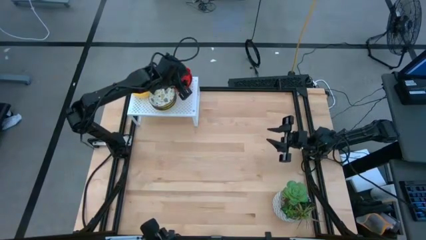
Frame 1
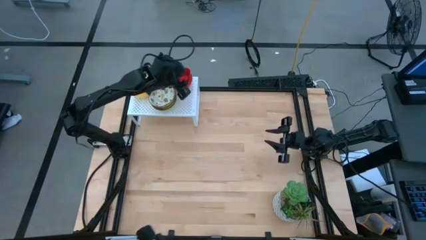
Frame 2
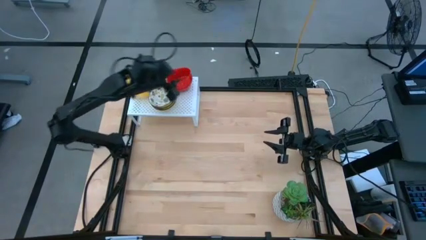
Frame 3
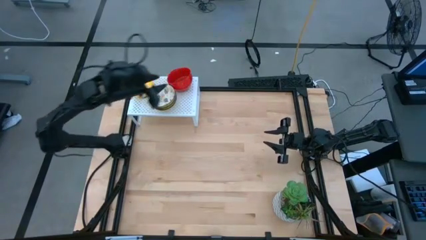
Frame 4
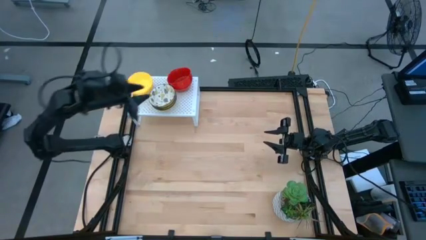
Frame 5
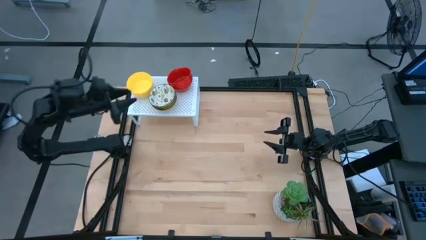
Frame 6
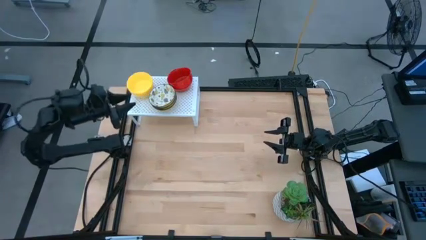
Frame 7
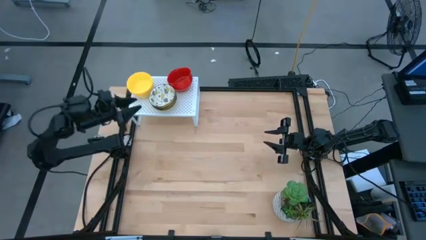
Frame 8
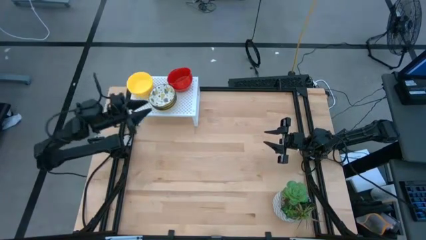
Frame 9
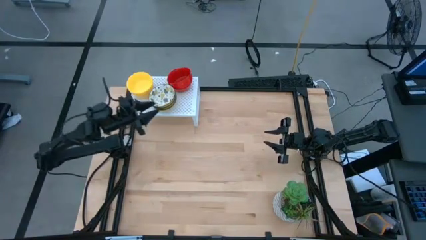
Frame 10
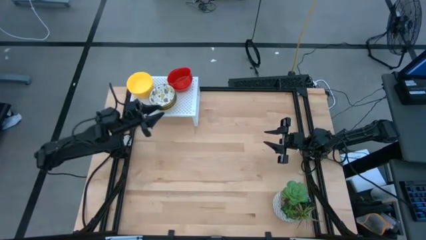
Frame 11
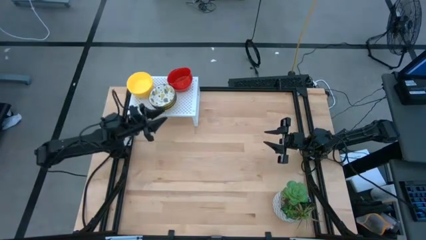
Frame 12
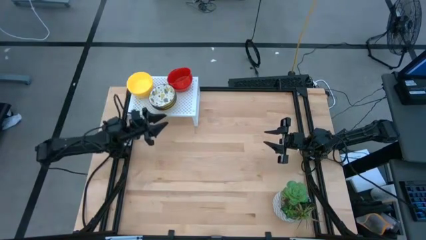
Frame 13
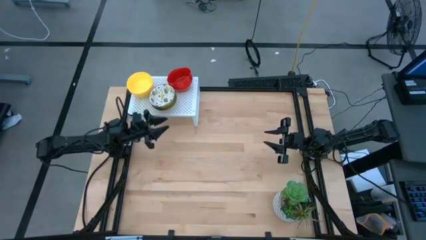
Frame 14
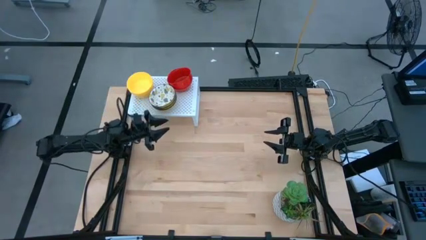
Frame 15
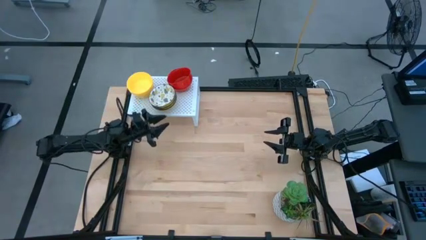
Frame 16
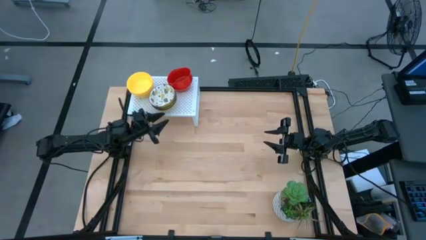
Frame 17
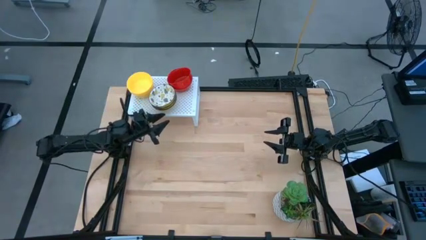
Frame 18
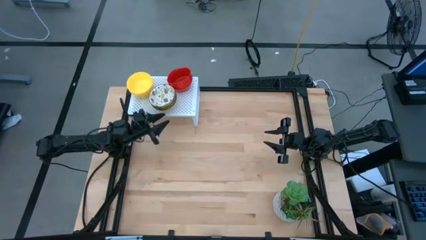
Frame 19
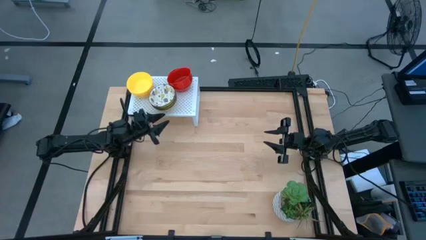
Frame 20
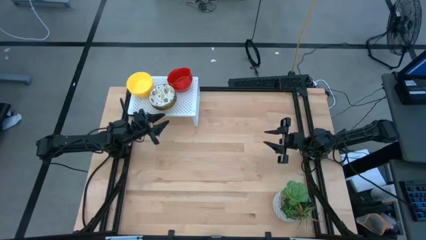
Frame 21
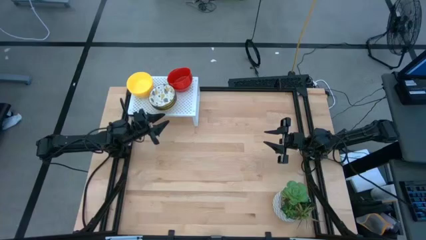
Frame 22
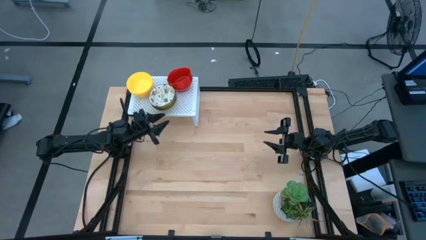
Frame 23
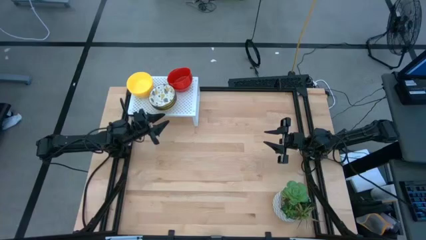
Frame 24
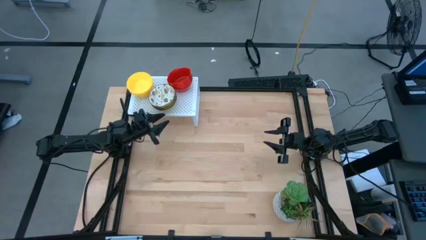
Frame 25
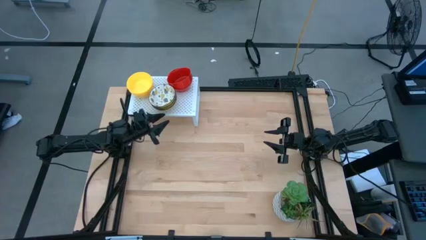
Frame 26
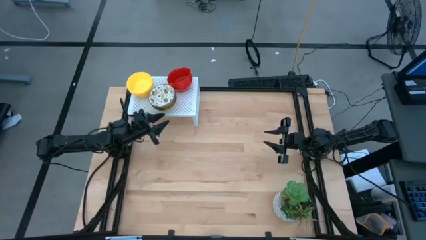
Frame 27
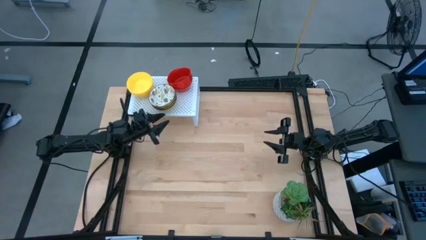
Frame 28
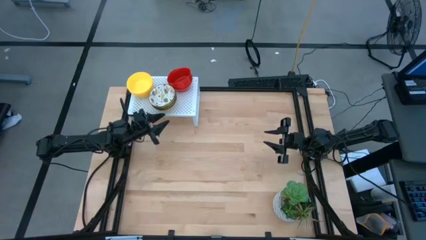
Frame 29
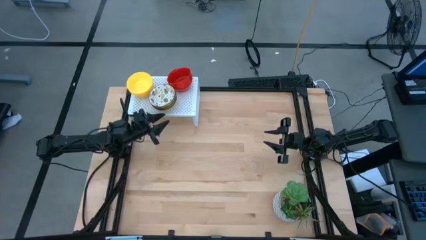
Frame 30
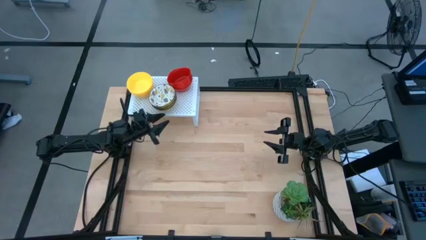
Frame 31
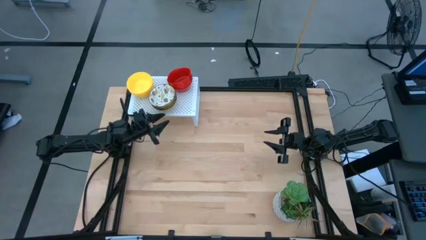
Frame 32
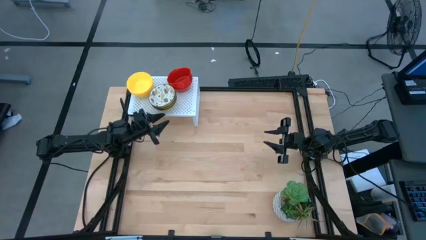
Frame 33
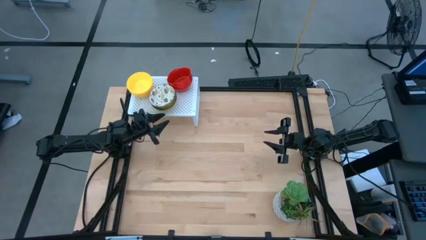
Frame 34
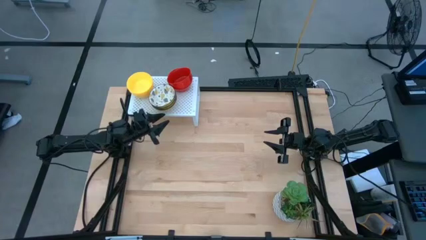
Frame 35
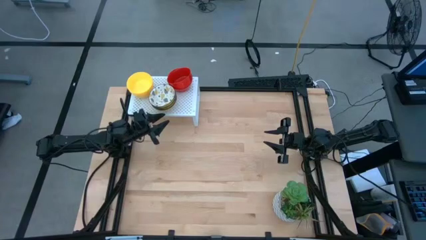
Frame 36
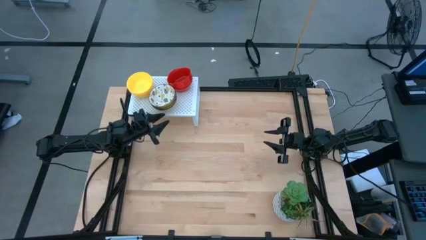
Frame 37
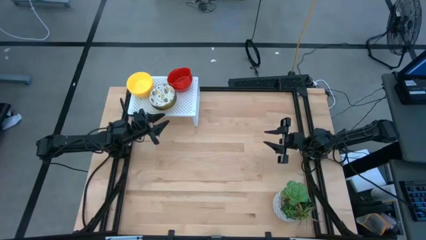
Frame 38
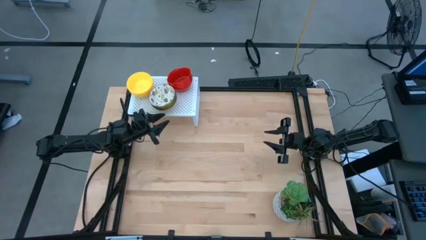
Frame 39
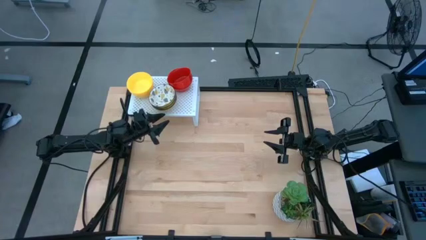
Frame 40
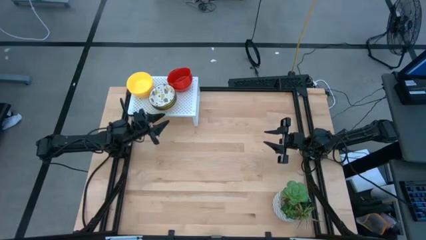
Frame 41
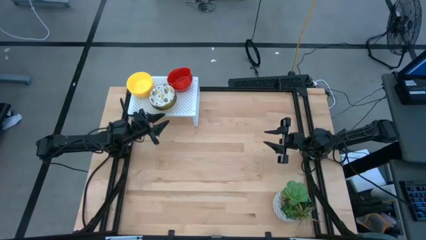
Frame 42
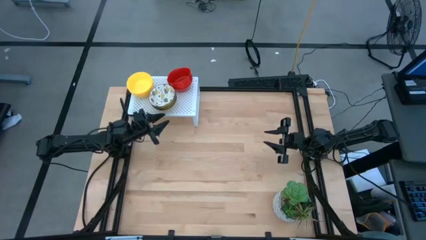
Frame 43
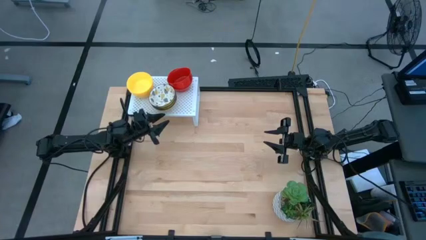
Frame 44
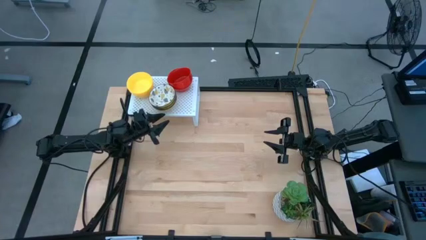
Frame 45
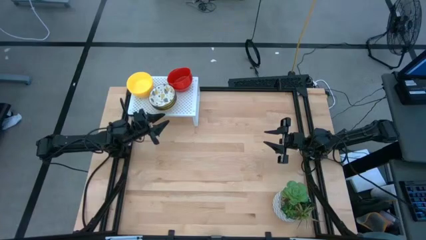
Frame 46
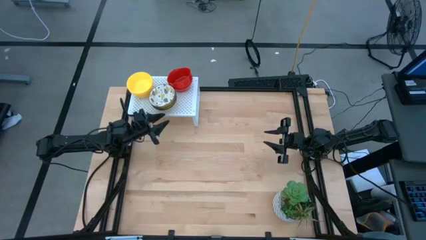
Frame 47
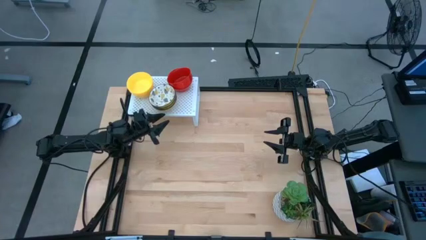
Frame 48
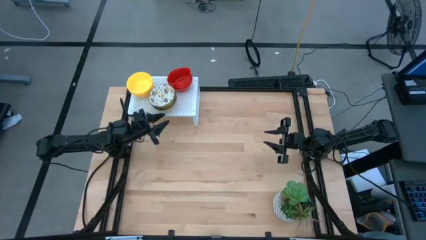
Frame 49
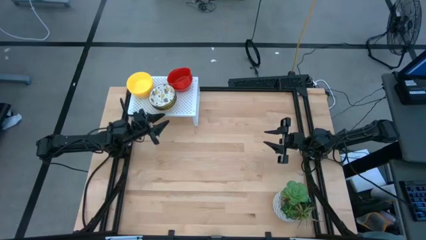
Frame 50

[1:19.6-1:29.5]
Task: Pick & Place Mini bowls
Return to Home Position

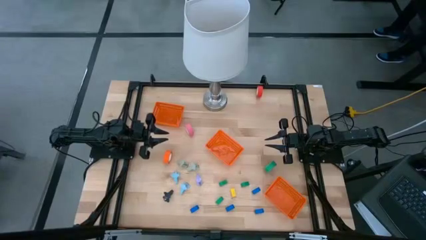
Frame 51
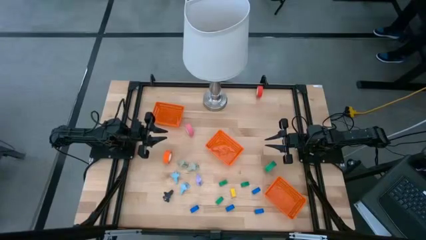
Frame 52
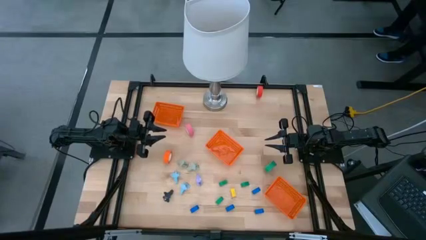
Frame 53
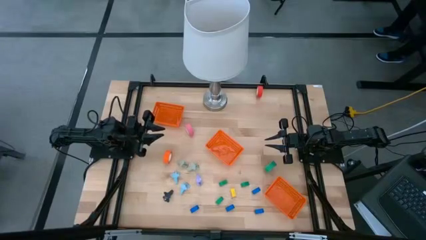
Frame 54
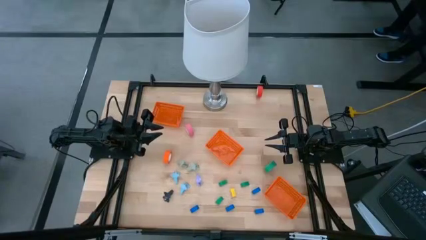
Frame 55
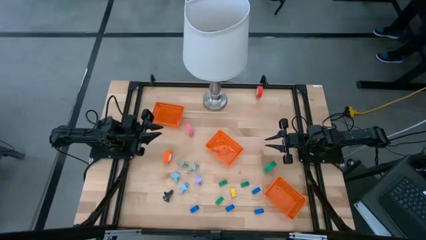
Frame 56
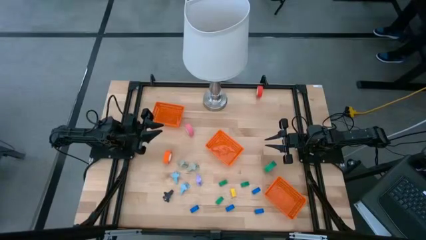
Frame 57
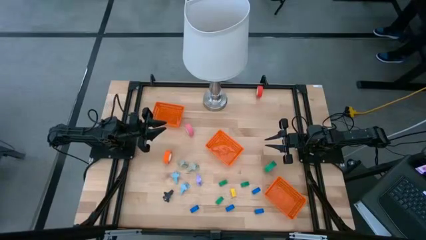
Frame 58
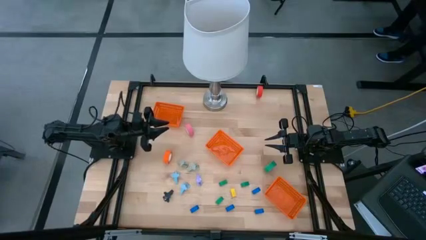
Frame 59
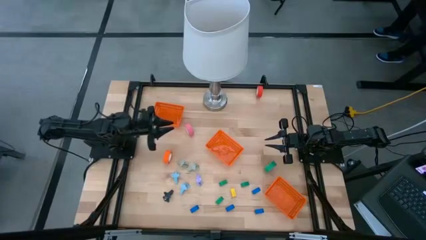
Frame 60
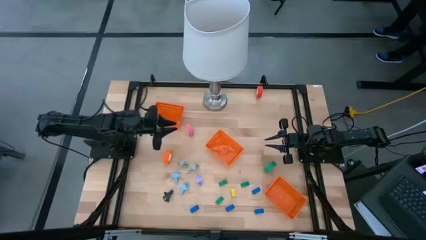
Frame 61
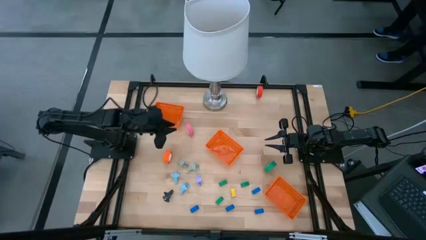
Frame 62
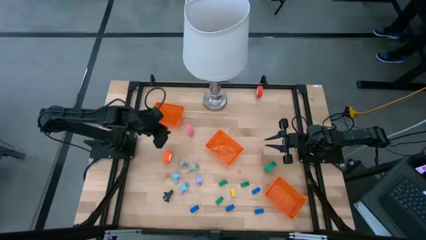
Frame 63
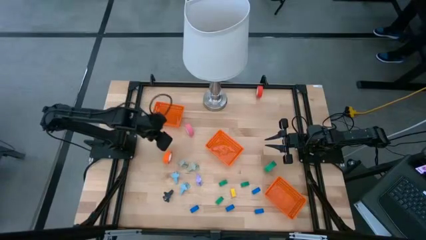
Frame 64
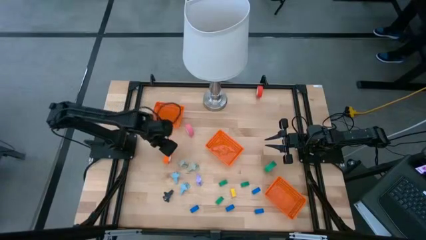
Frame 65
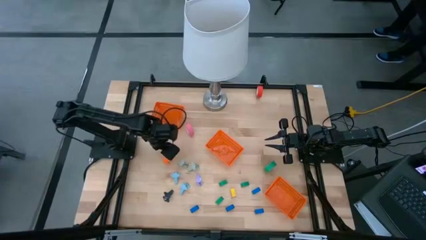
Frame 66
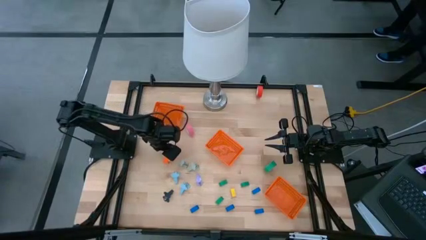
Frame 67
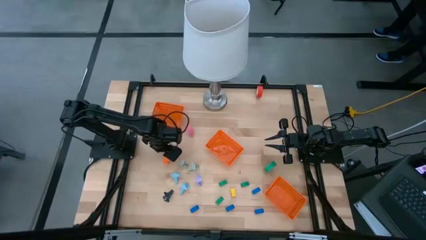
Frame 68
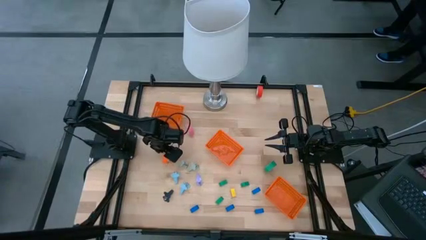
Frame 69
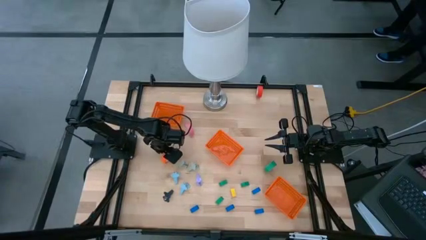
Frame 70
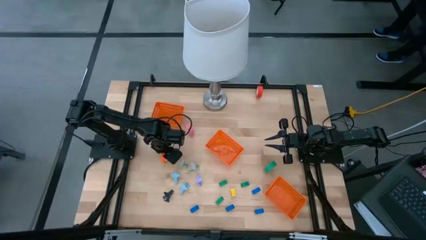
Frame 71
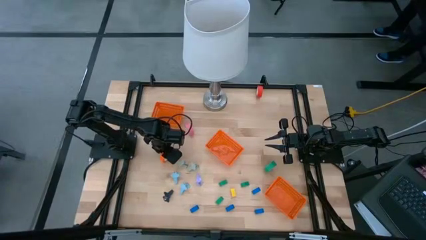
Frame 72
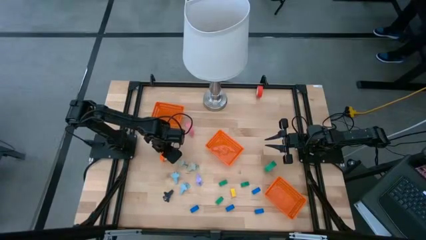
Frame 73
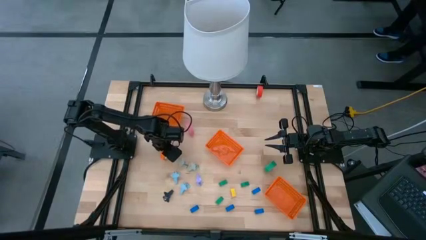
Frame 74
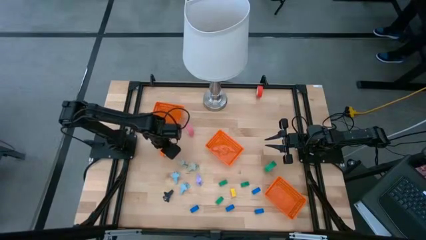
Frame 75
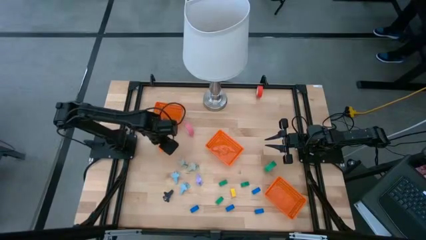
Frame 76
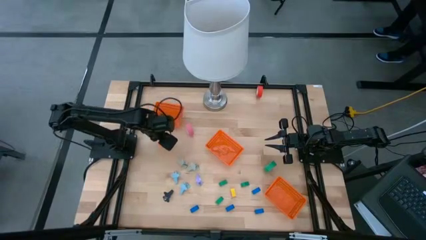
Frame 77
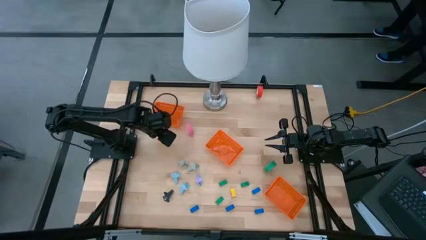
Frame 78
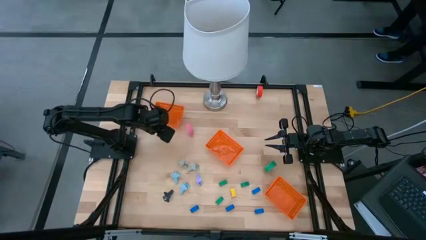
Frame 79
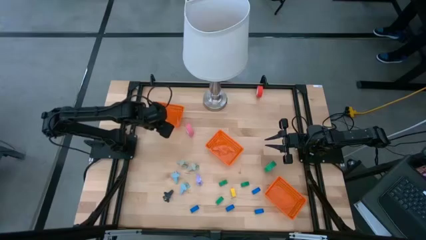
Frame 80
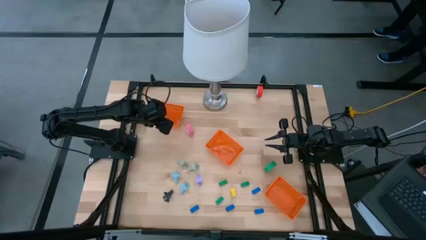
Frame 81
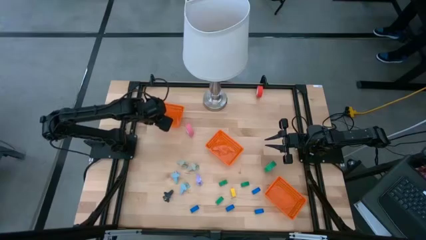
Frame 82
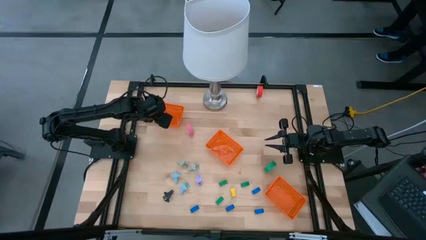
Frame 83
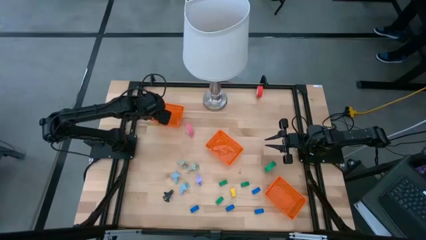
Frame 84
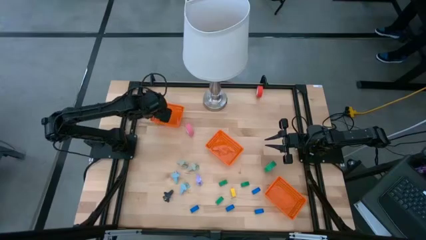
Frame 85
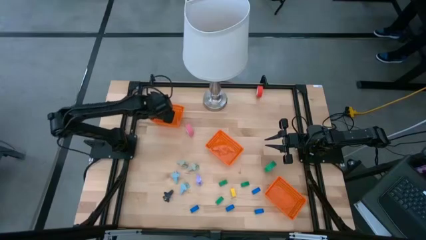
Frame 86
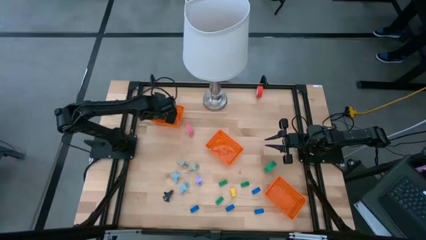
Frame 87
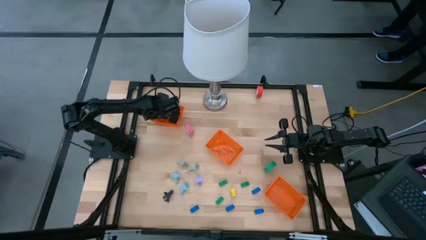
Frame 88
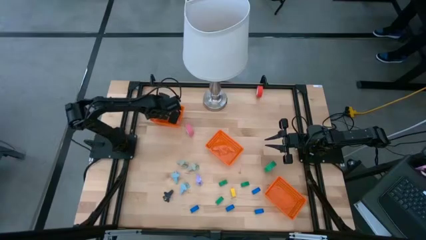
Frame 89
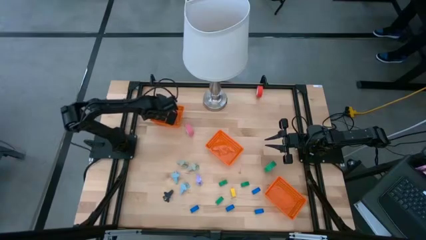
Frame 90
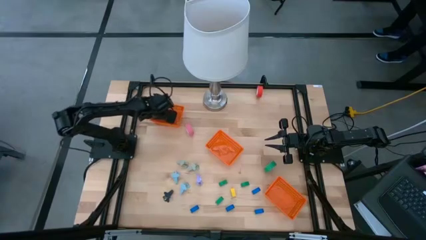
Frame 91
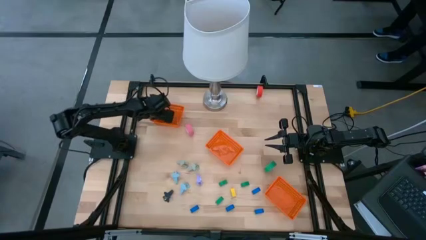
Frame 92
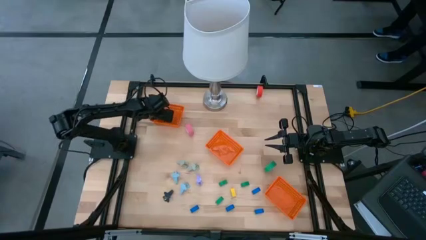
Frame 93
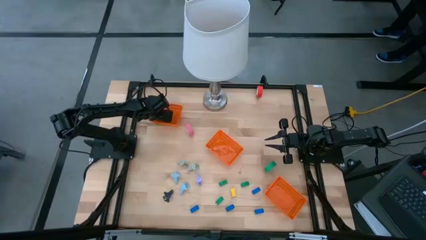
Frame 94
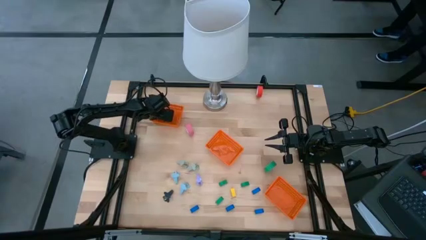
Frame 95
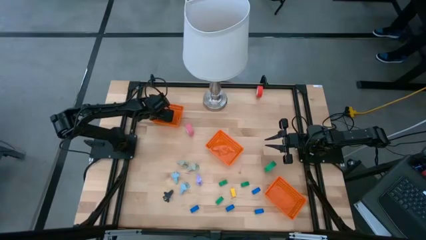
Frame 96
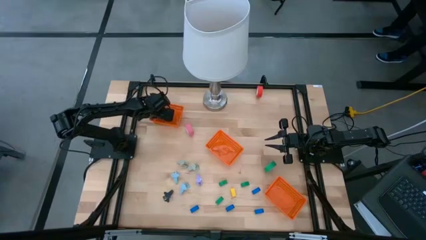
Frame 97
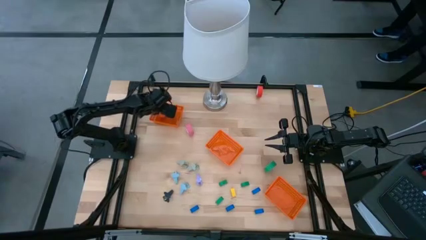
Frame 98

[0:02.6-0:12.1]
Task: Pick and place Stapler, Stapler remover, tape
Put the orange tape into the top orange bin
